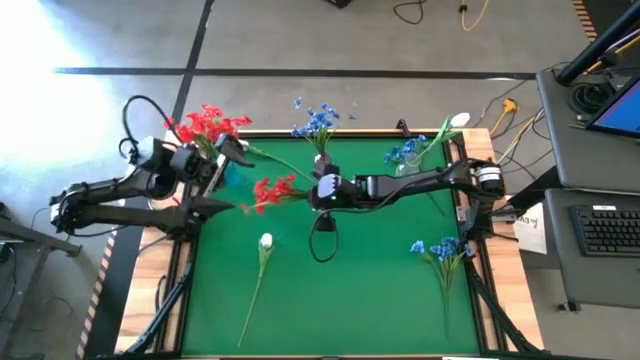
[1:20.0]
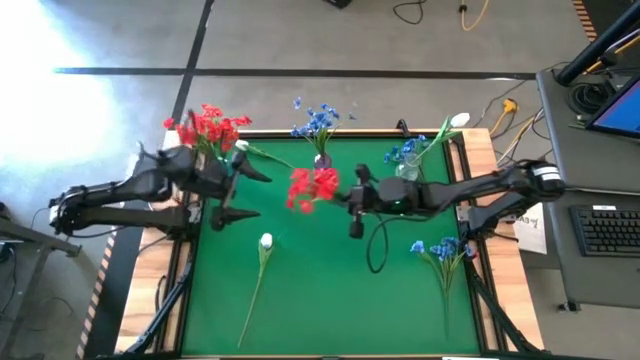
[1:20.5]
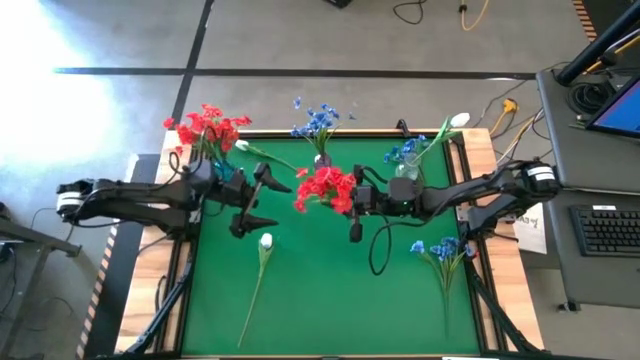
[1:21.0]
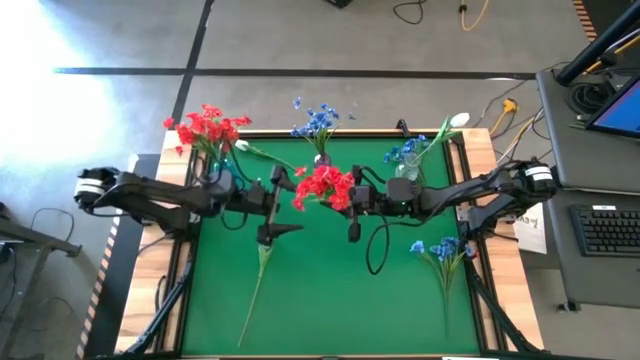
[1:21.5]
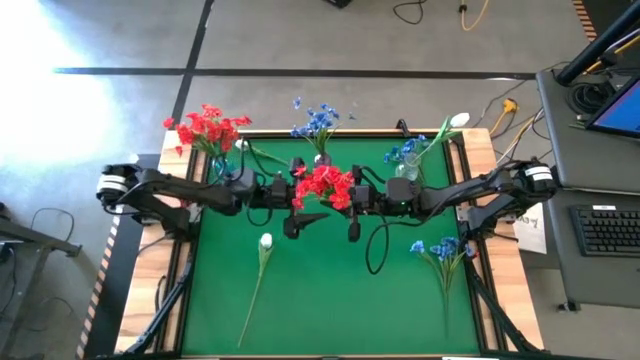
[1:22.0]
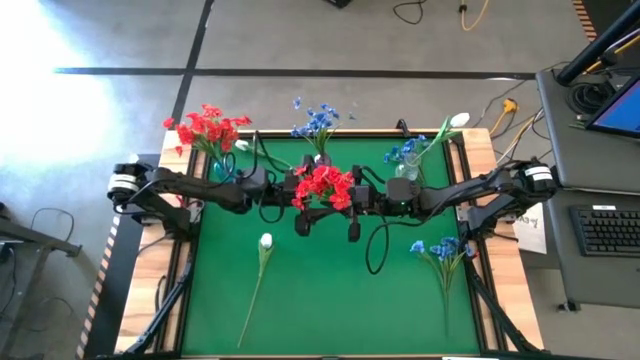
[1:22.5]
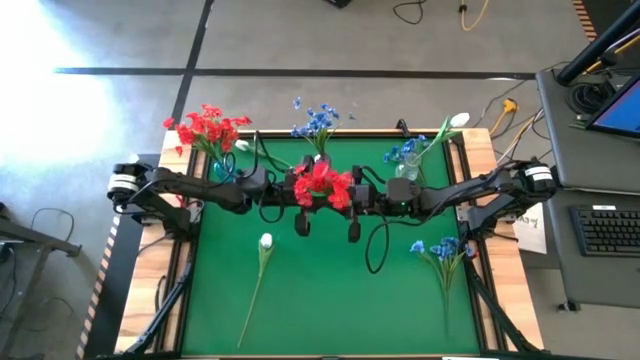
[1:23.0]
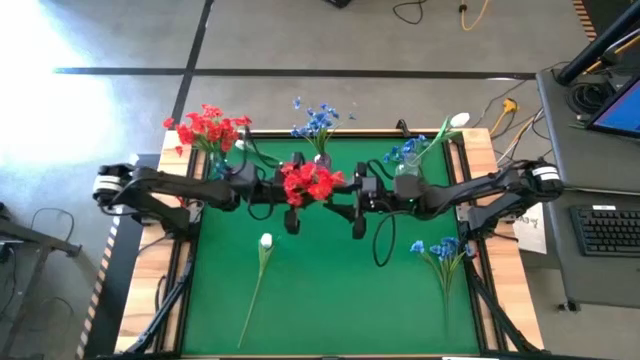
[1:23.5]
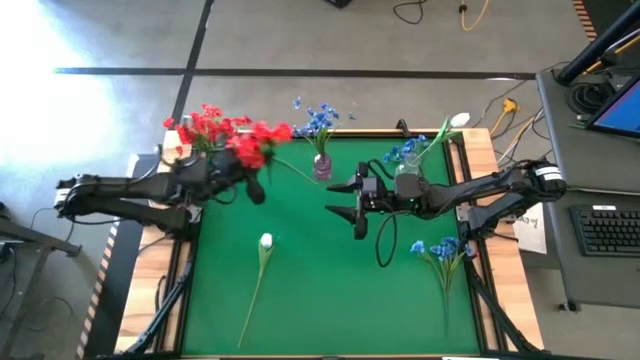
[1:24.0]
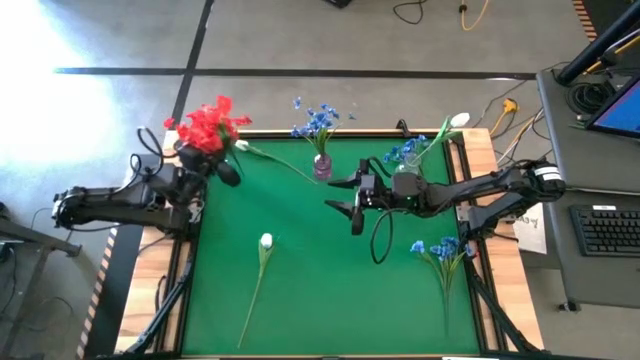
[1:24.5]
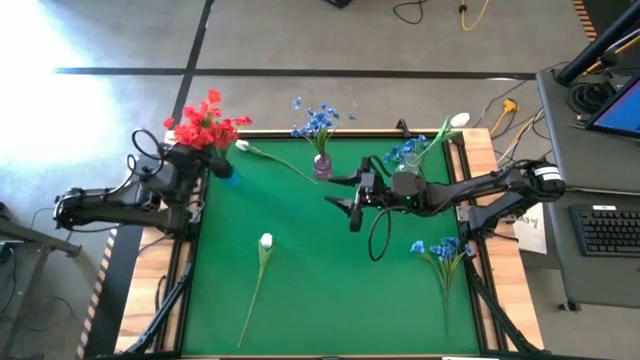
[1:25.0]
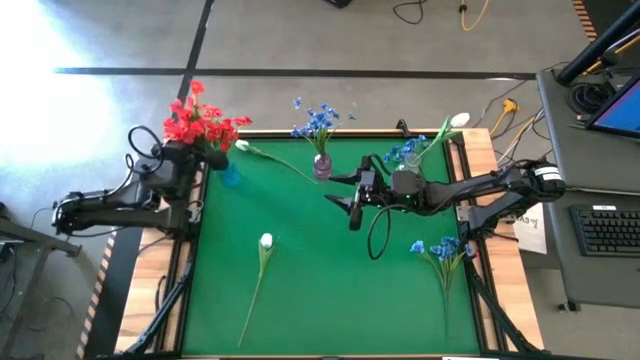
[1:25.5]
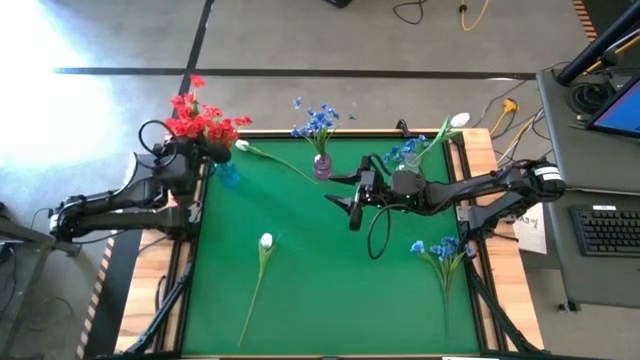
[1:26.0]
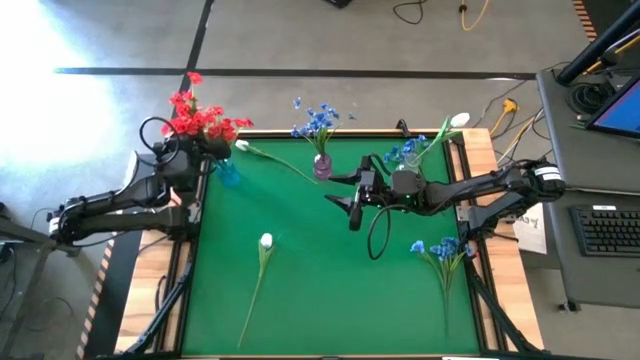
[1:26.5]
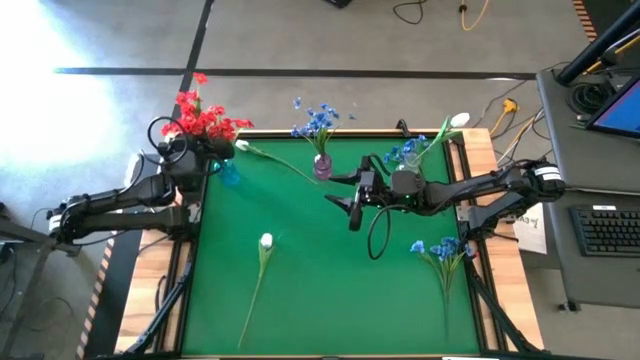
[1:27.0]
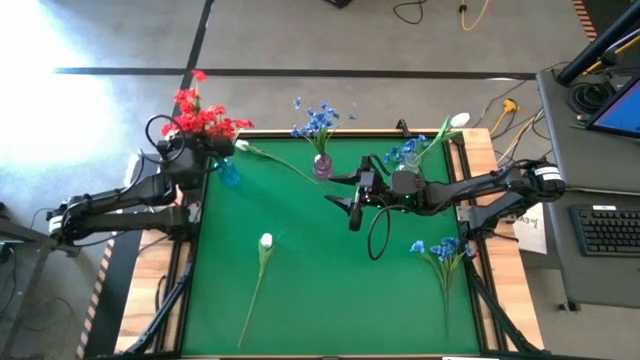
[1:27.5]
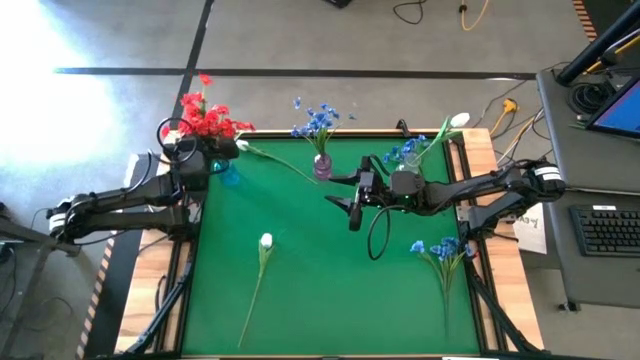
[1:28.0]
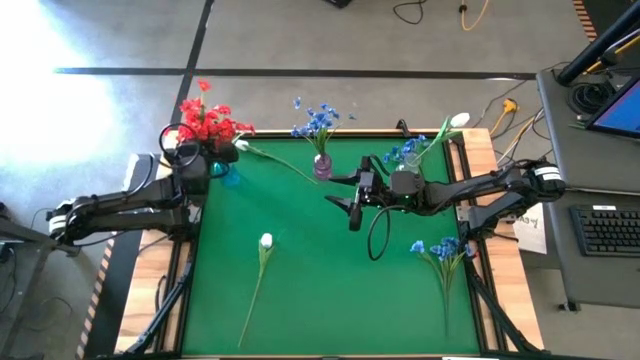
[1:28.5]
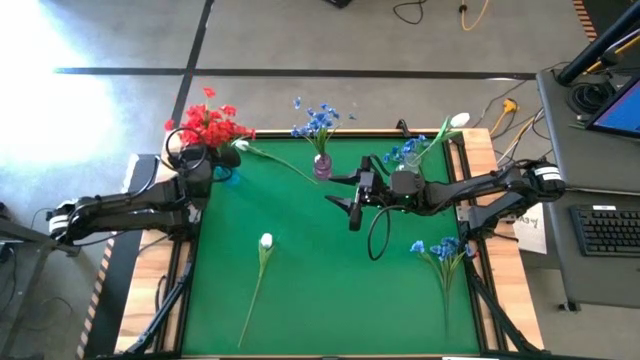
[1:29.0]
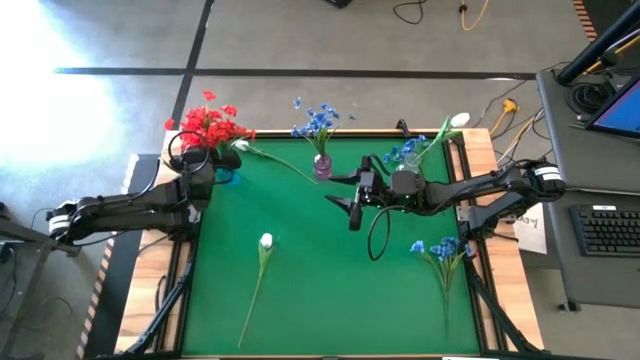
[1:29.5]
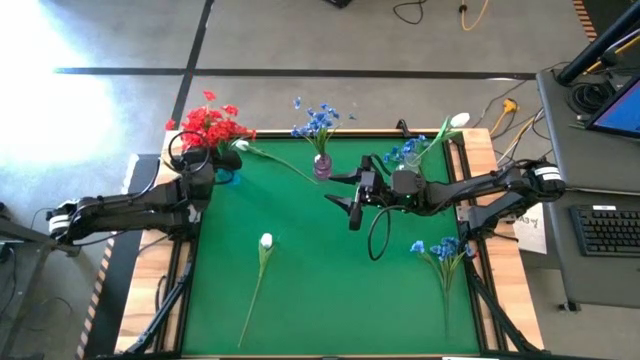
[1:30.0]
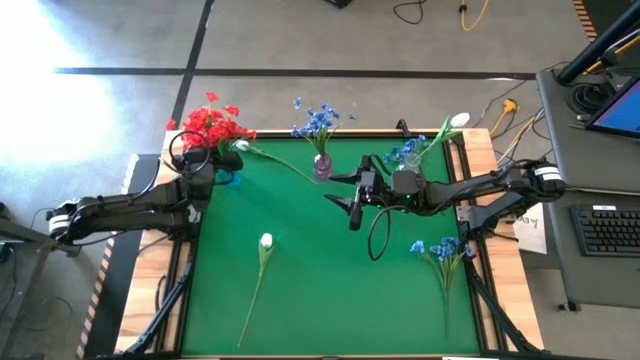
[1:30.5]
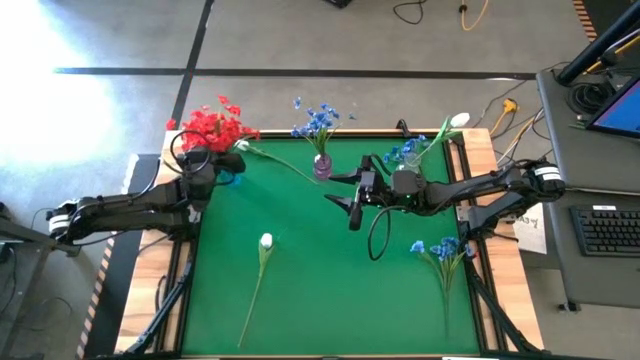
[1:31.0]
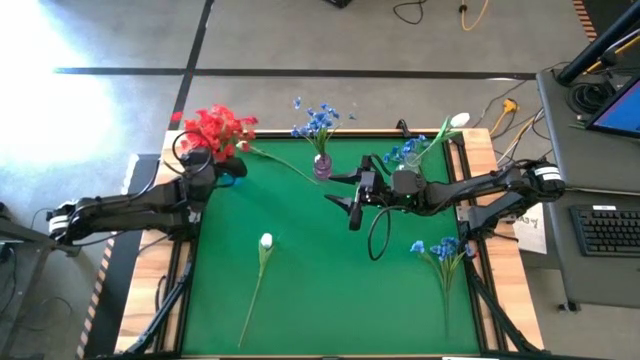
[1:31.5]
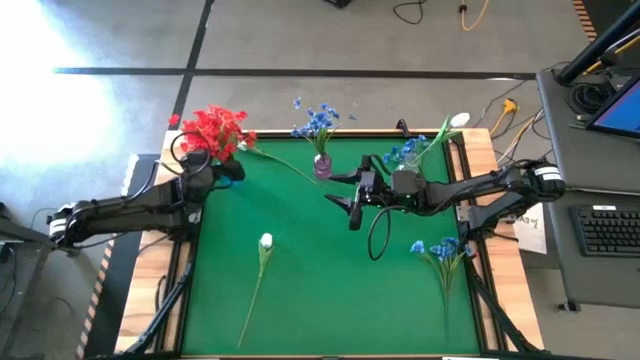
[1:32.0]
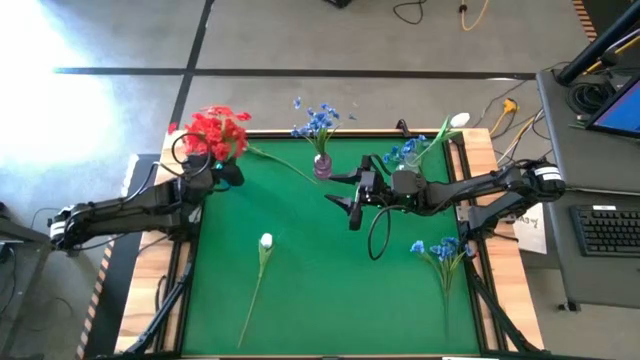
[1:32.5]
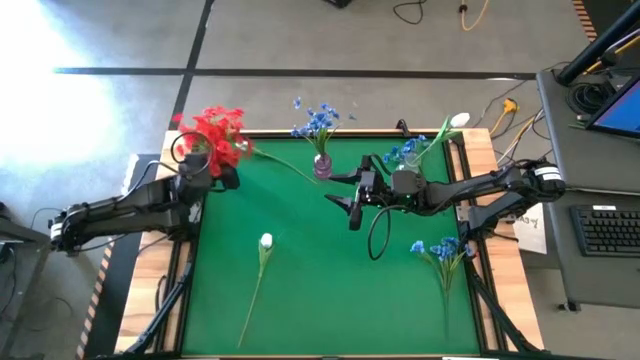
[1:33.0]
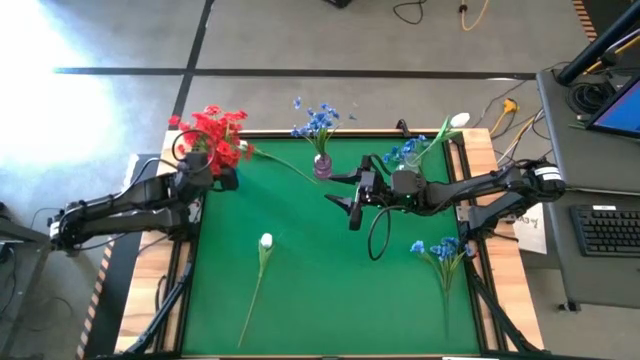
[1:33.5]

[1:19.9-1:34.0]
Task: Sort flowers into vase by color
Put the red flowers into the blue vase

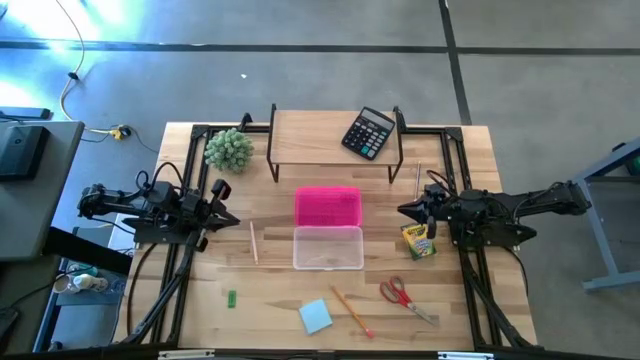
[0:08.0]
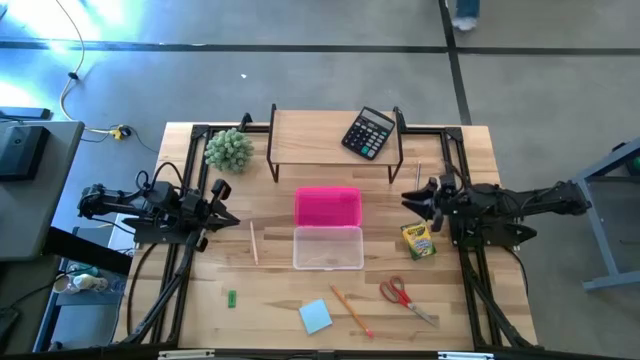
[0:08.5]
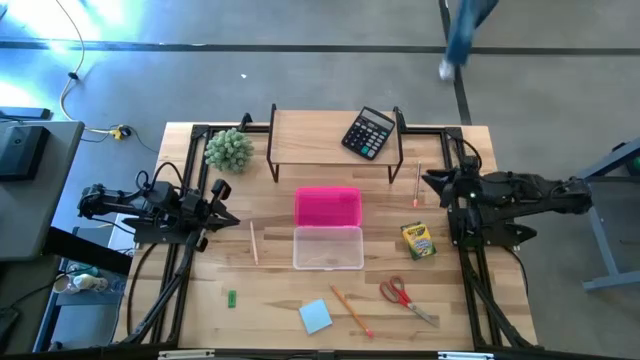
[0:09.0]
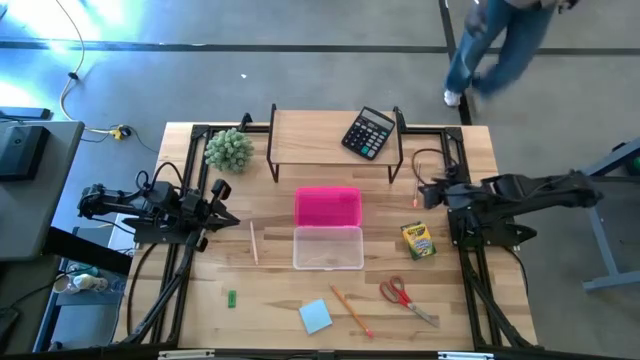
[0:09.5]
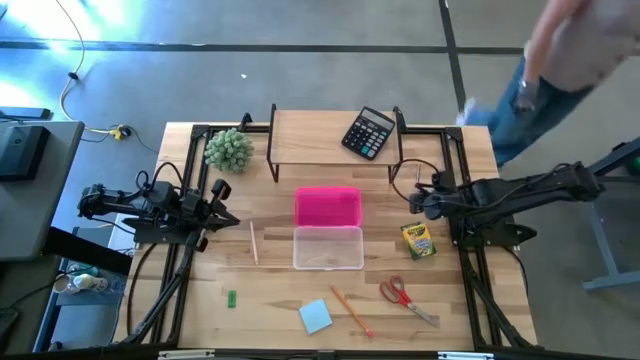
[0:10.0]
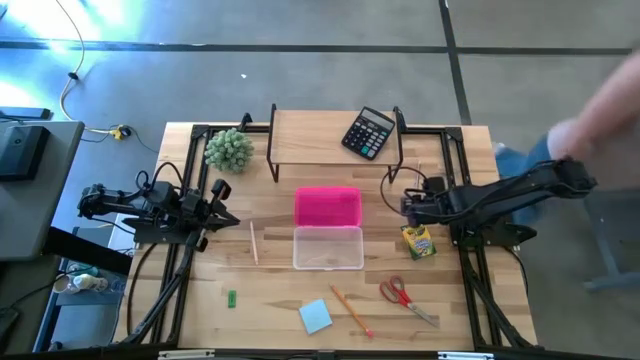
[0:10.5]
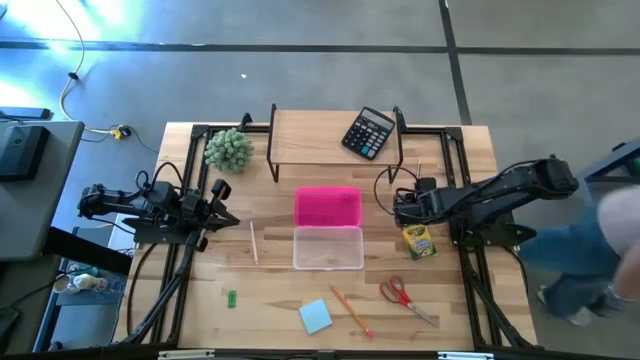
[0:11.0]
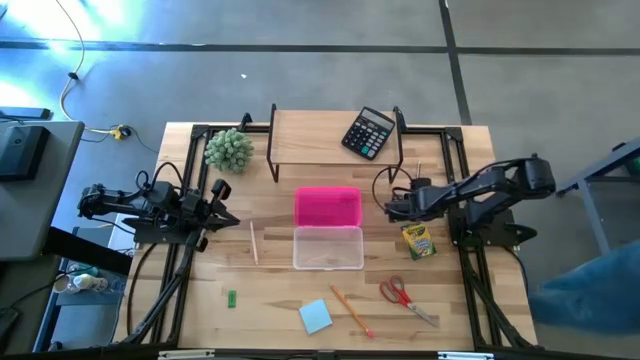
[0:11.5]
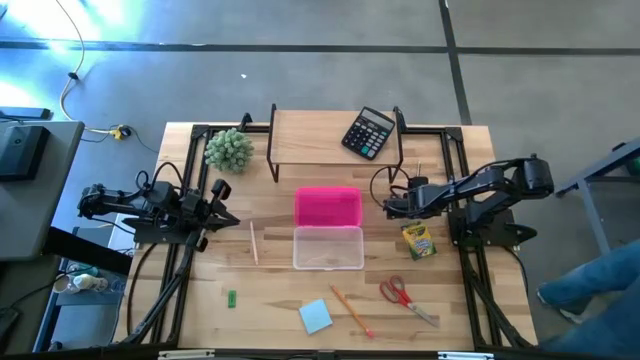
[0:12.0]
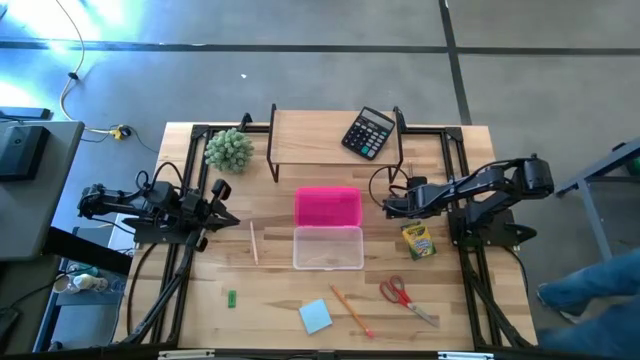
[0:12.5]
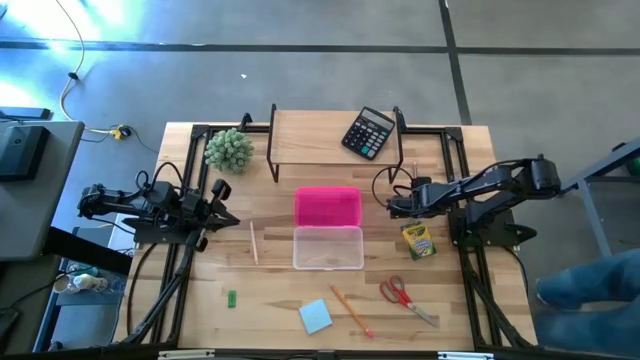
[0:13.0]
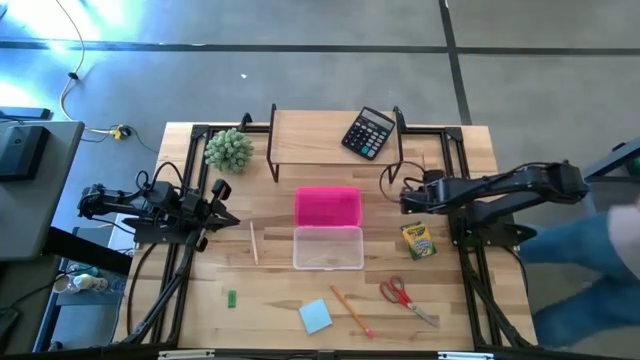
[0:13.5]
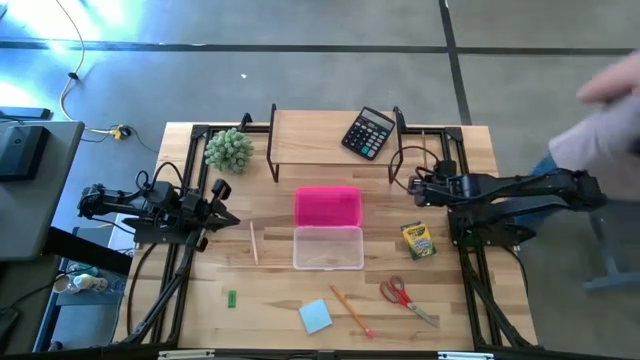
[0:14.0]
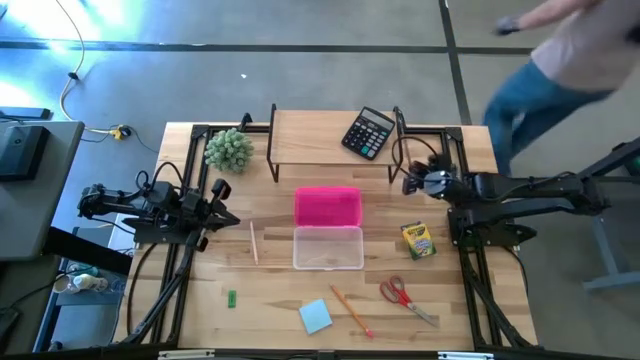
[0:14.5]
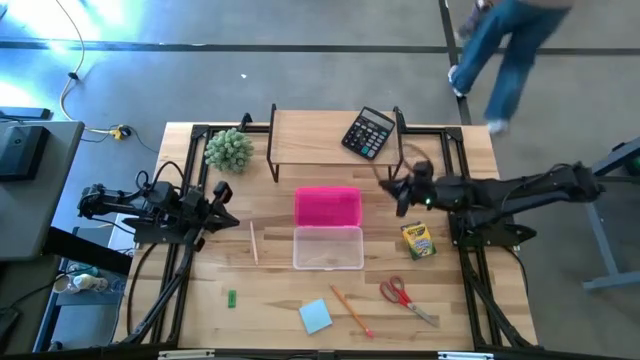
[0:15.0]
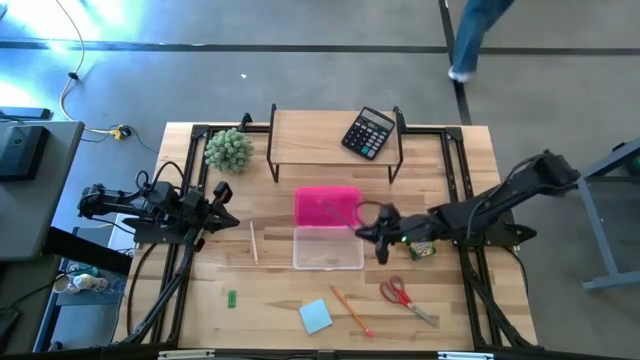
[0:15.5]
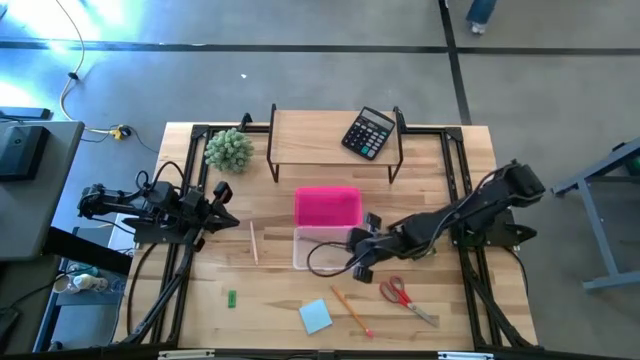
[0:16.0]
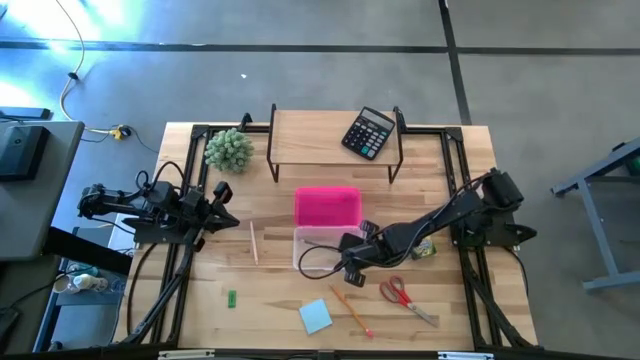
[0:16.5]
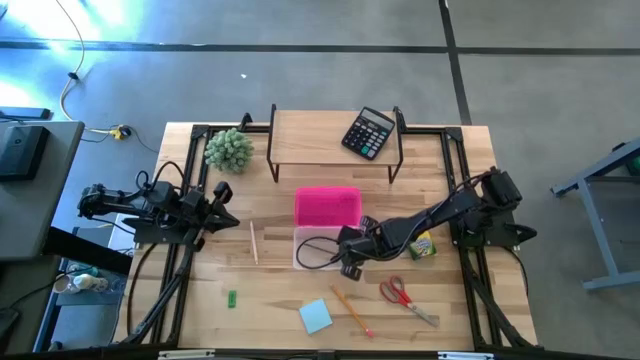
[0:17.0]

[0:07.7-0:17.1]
Task: Pack school essentials
Put the black pencil into the supply box
